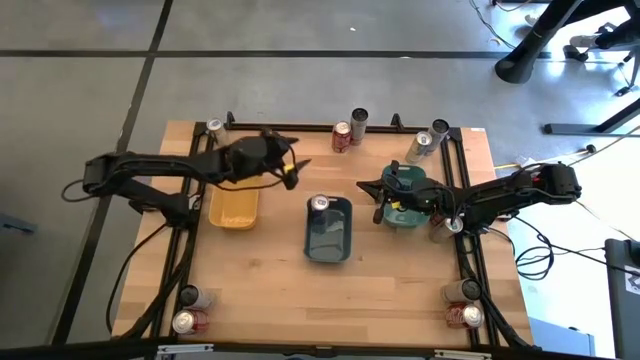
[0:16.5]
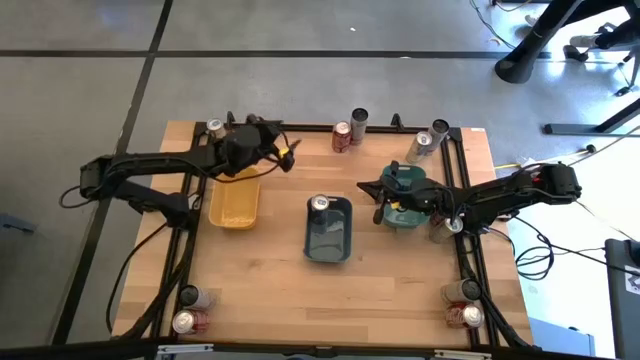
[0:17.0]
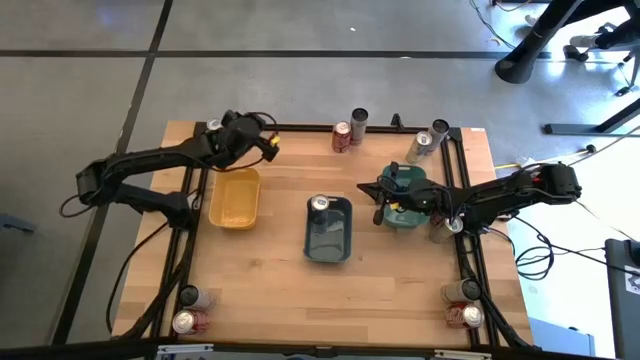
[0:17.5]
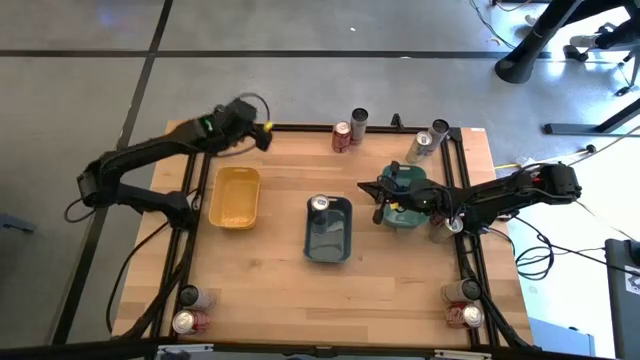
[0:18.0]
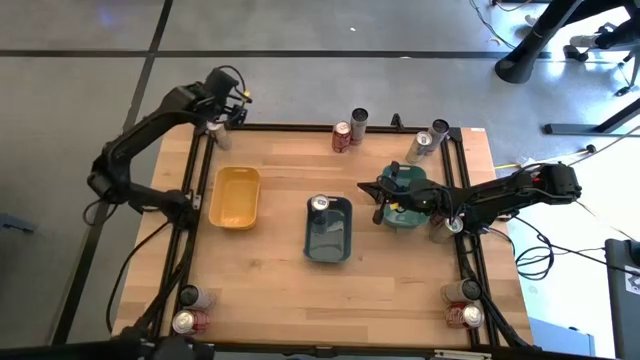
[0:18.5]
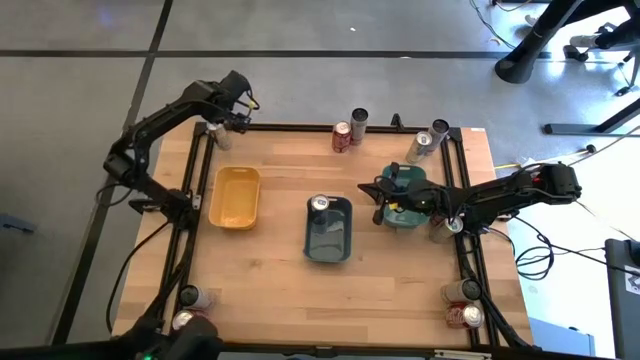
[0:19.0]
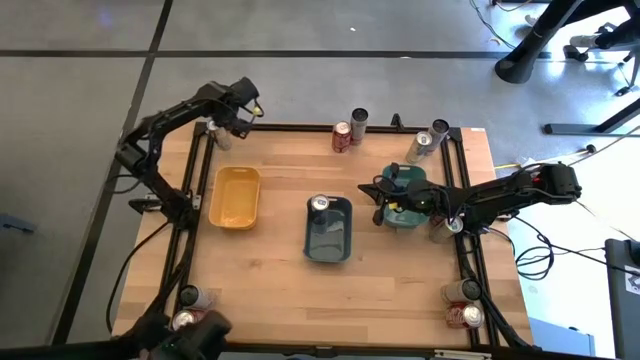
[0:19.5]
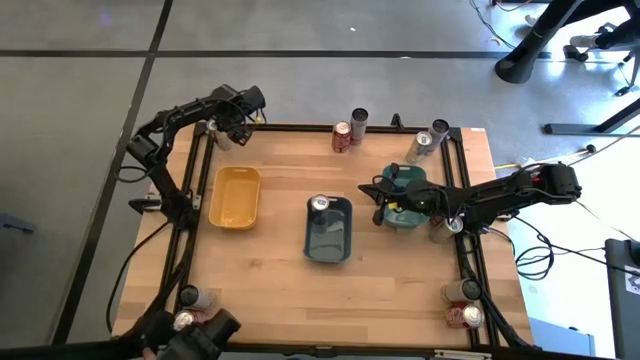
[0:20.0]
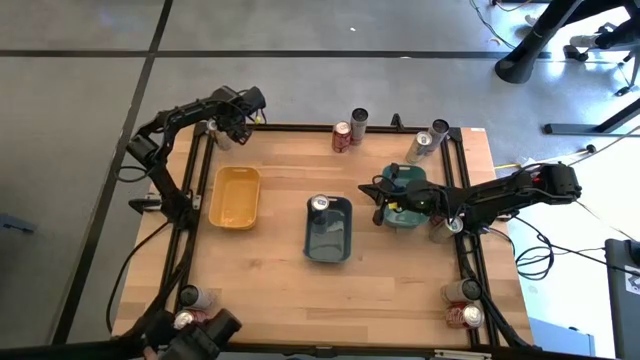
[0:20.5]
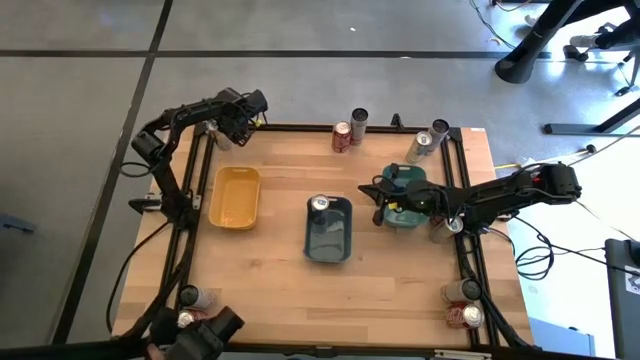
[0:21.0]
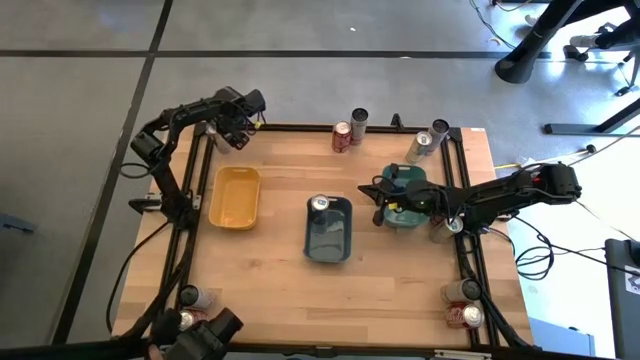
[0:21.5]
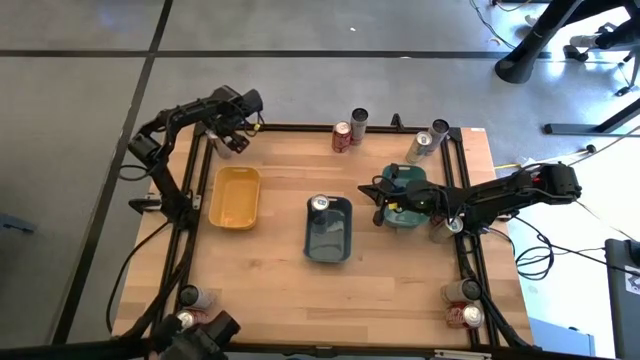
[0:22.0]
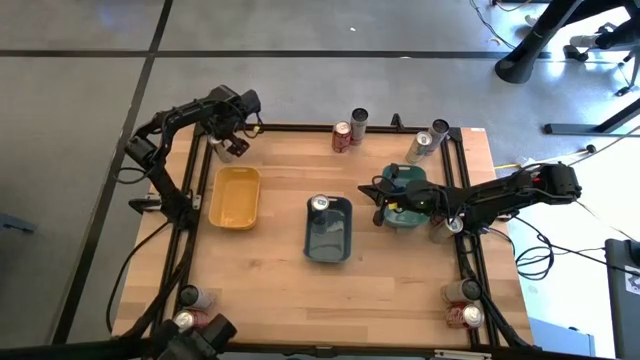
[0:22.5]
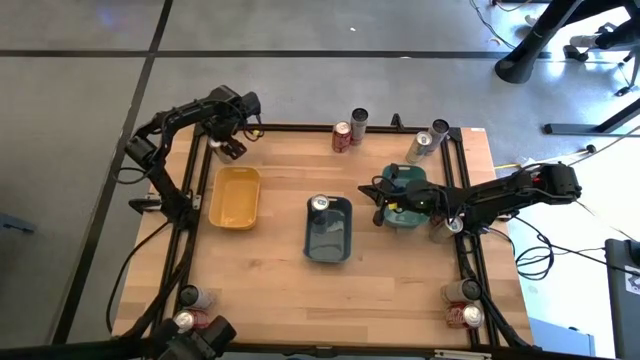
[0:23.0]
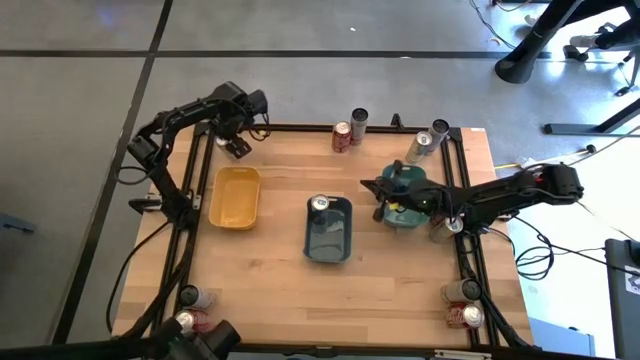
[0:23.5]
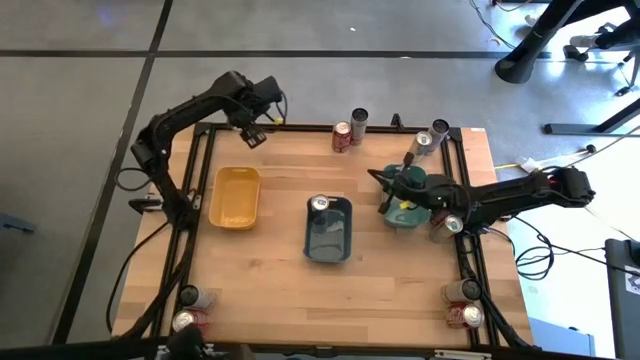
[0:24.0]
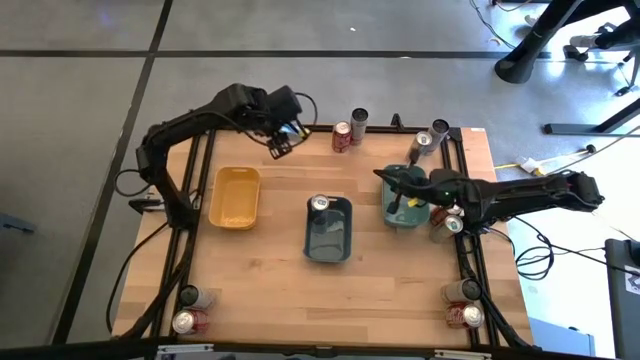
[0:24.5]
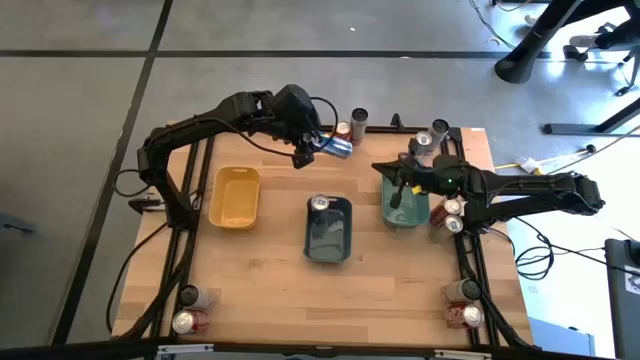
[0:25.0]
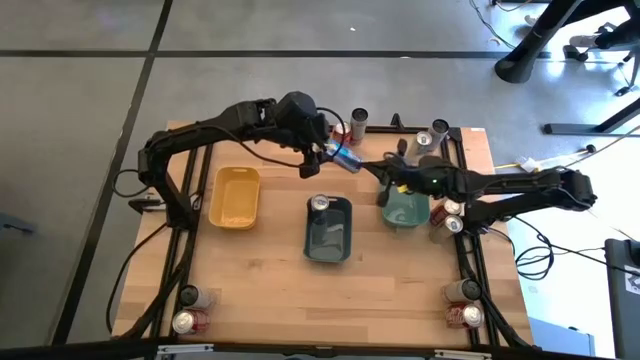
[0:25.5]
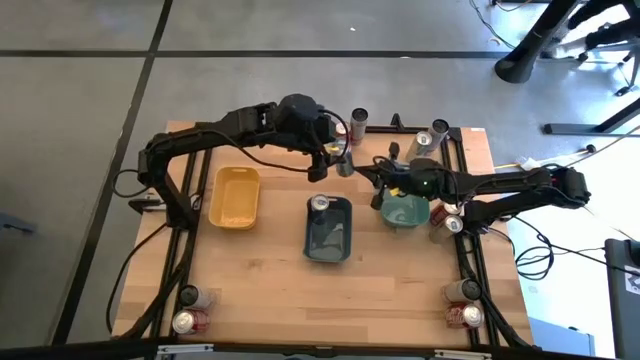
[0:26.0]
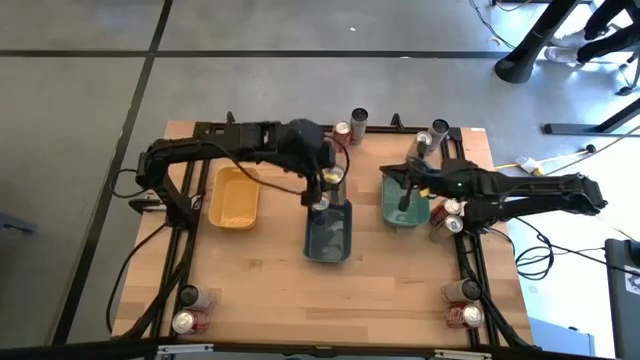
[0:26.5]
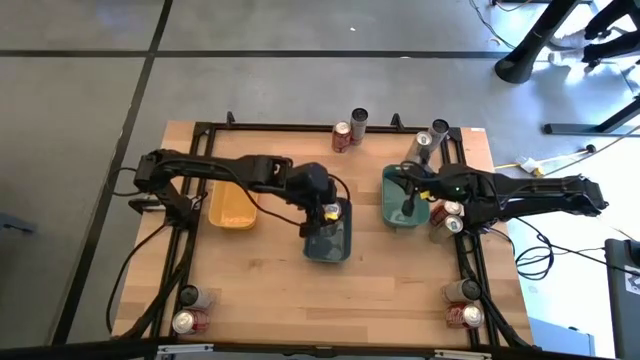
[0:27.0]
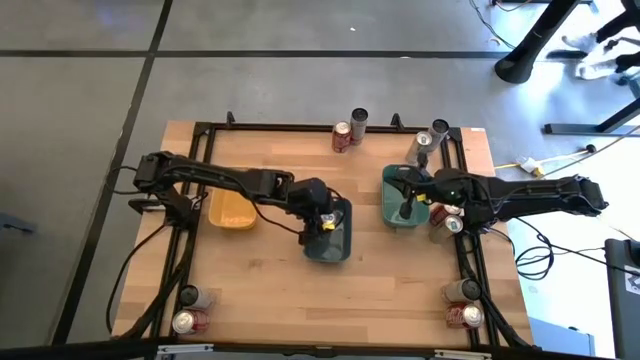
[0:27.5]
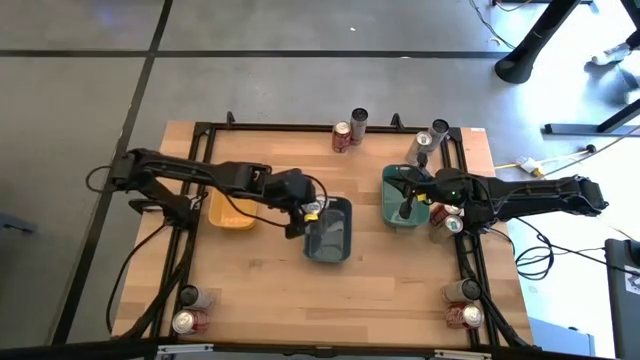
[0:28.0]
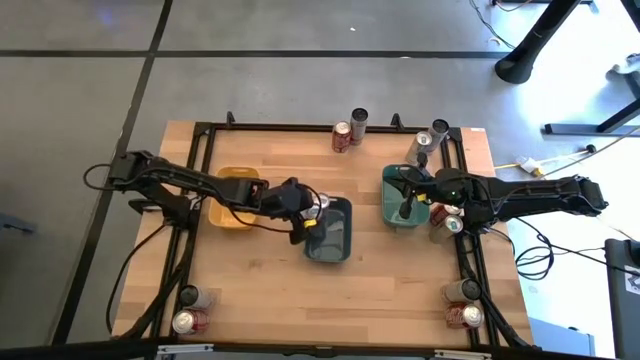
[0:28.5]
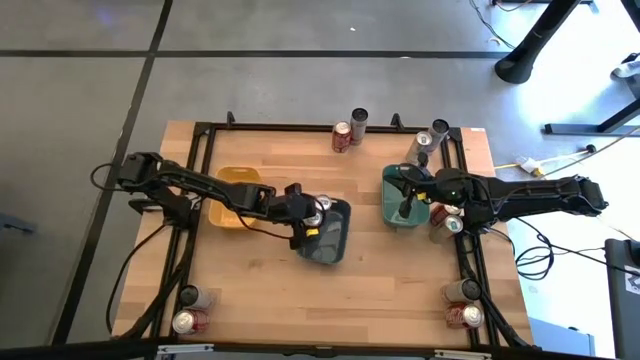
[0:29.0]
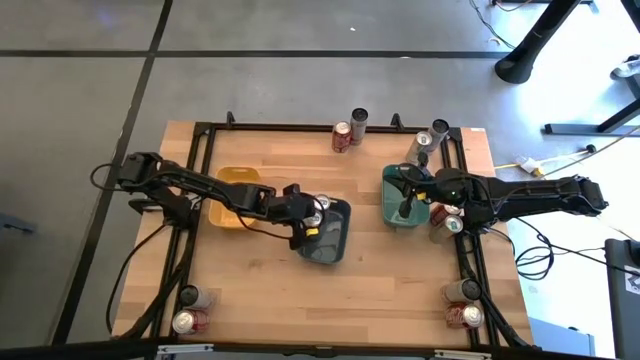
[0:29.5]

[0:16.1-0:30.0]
Task: Sort soda cans
Put the blue soda can into blue bin

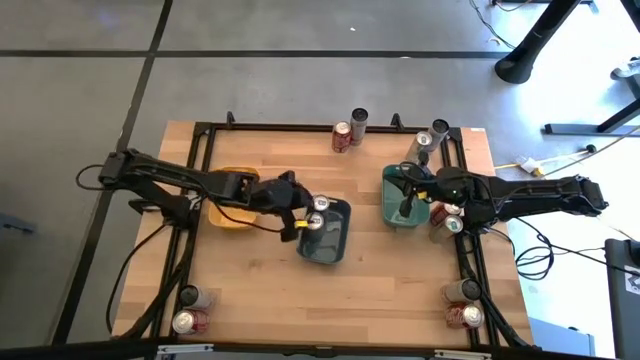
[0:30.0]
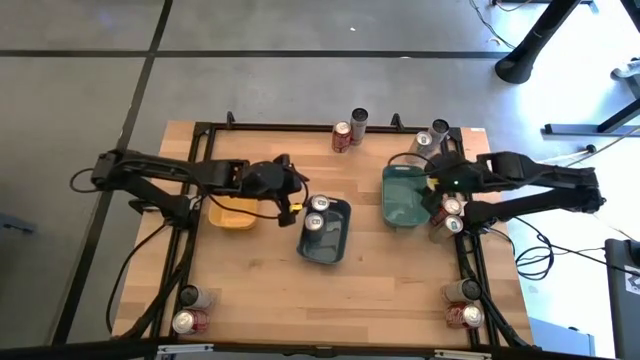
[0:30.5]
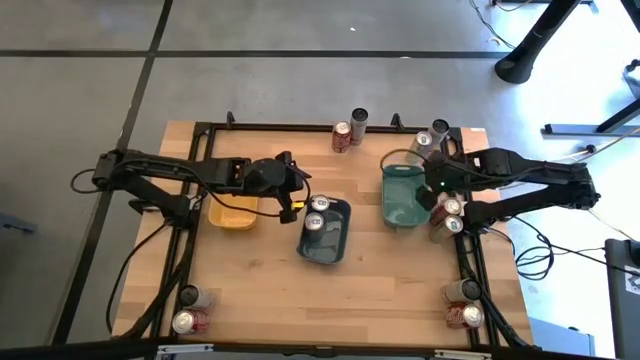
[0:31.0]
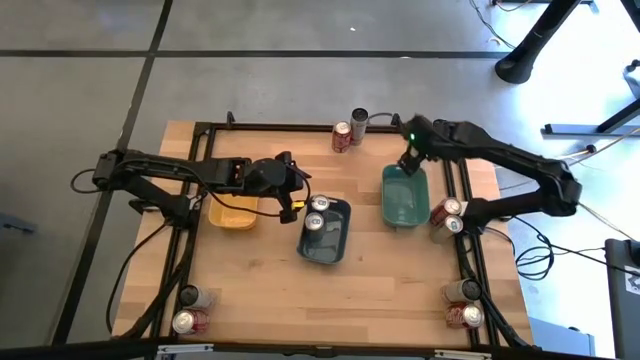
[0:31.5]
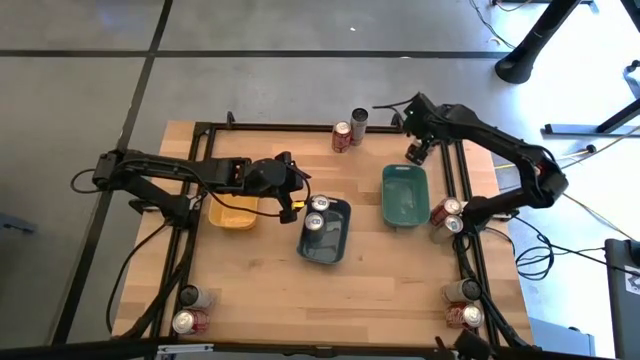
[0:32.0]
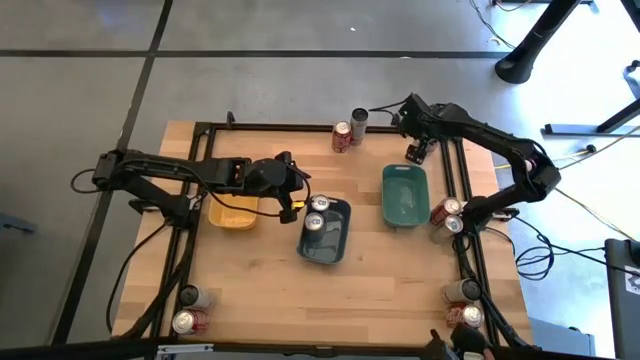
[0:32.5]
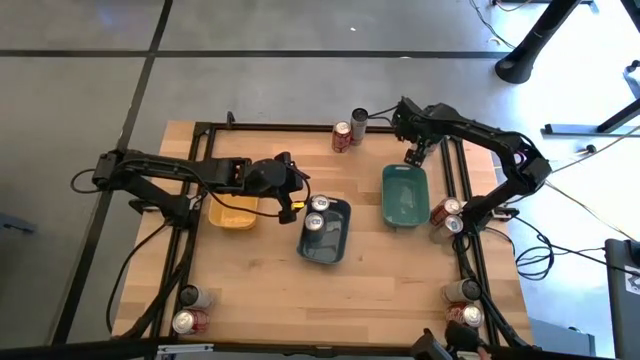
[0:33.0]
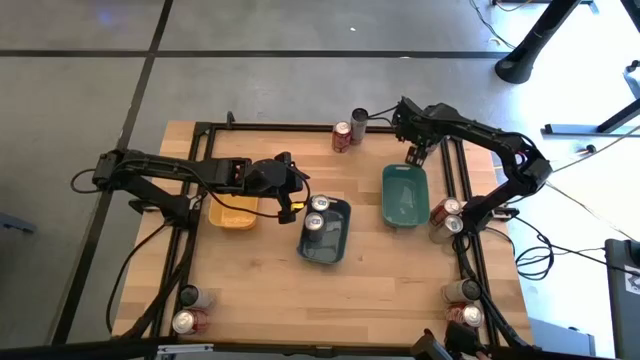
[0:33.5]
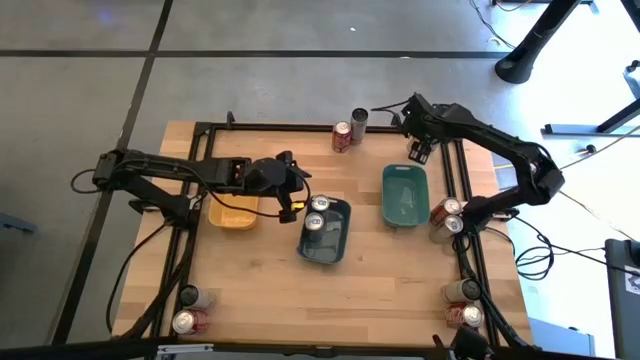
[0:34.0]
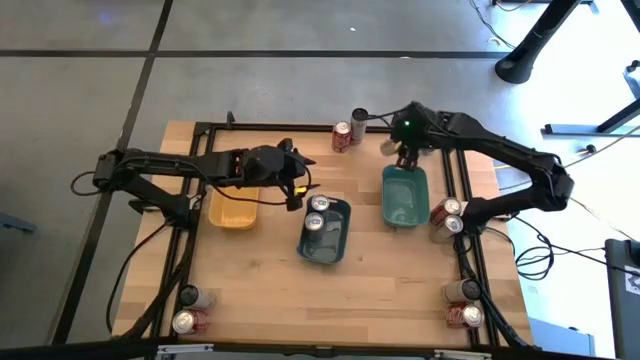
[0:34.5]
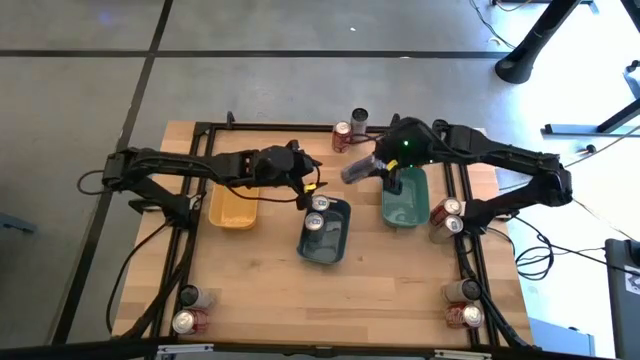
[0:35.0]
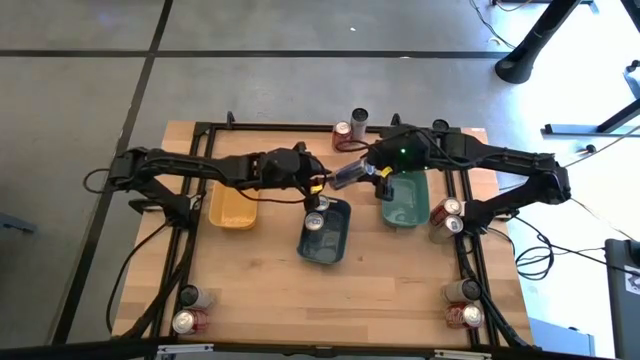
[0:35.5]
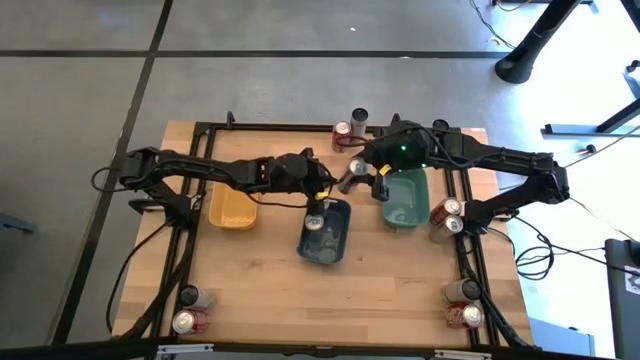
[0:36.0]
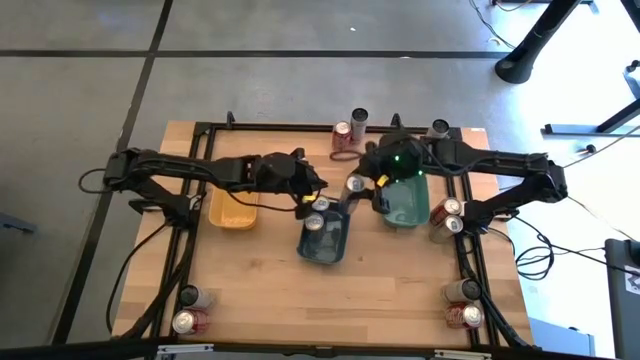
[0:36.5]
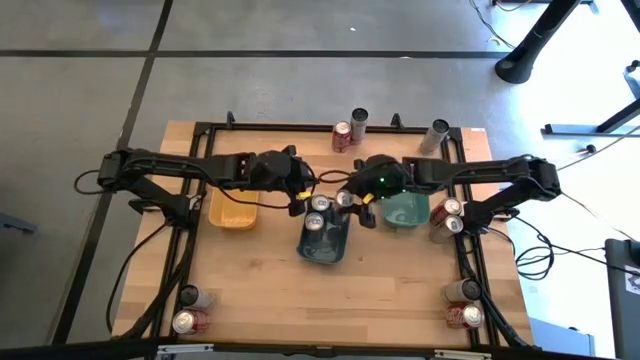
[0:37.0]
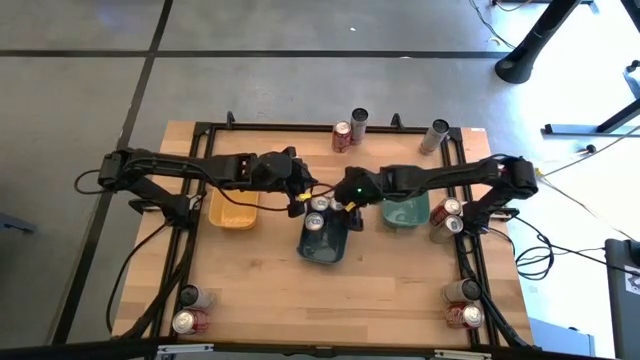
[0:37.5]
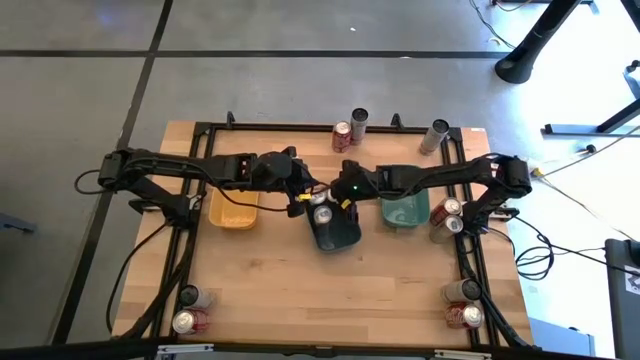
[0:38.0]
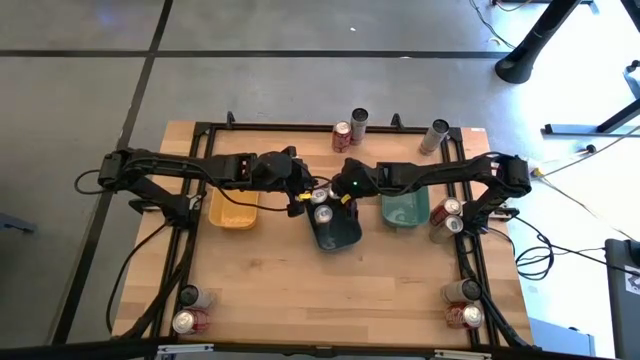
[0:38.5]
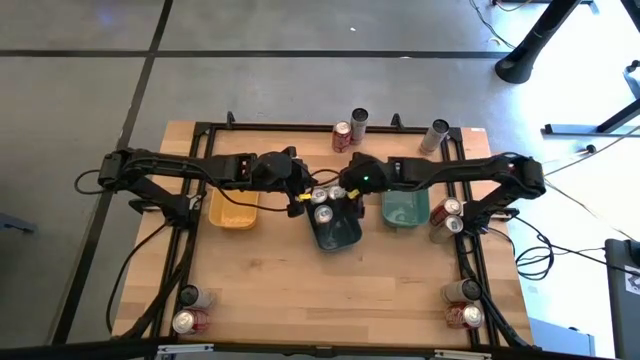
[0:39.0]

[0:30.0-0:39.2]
Put the blue soda can into blue bin
